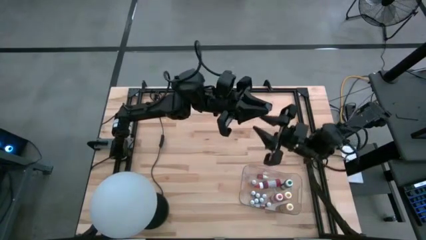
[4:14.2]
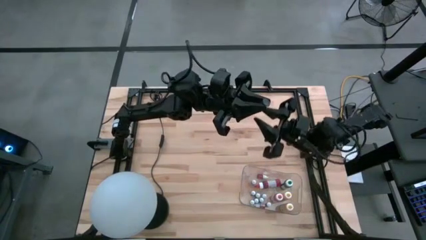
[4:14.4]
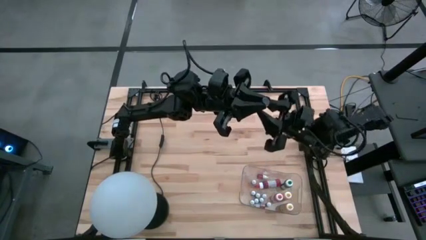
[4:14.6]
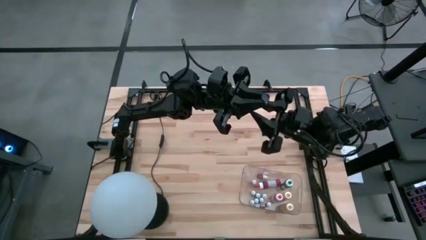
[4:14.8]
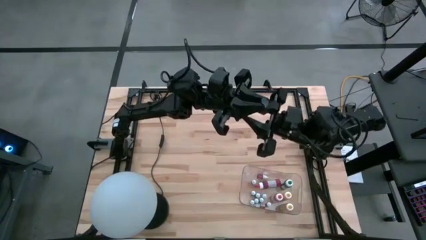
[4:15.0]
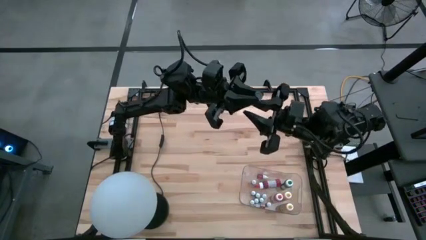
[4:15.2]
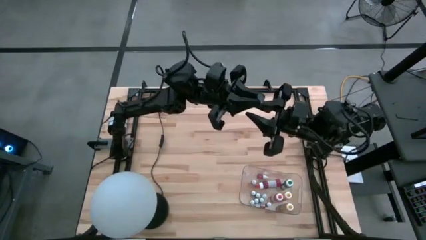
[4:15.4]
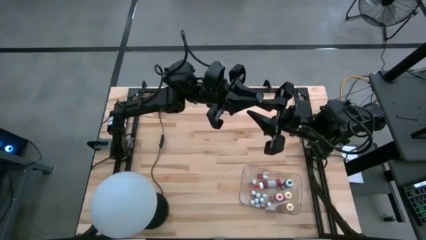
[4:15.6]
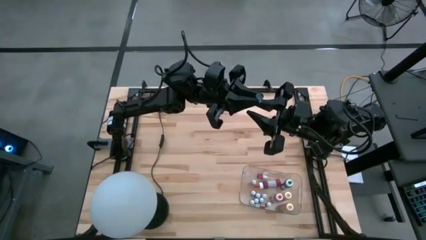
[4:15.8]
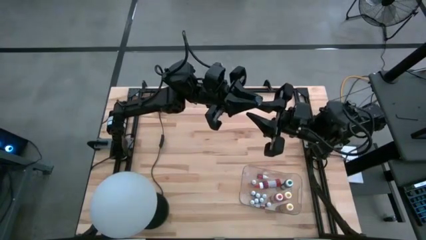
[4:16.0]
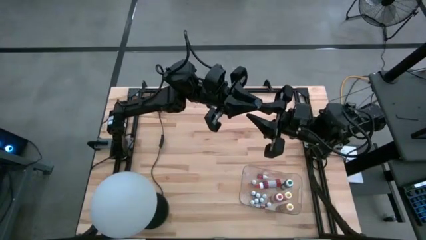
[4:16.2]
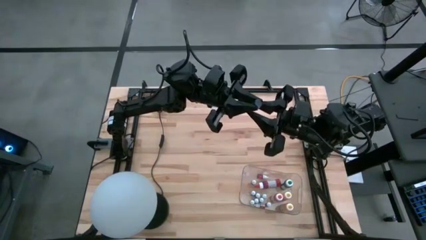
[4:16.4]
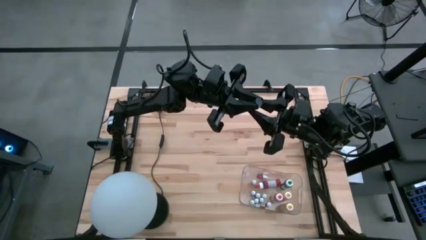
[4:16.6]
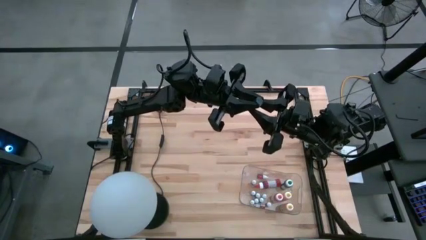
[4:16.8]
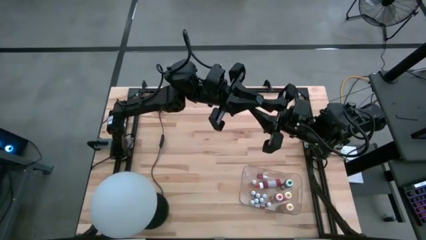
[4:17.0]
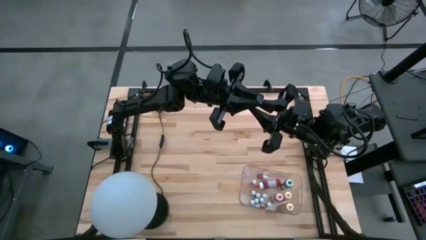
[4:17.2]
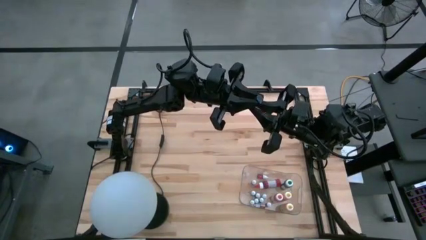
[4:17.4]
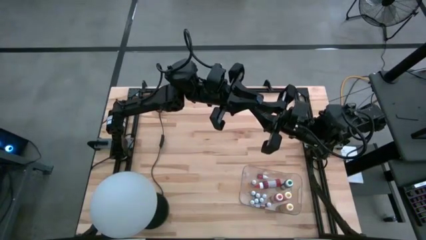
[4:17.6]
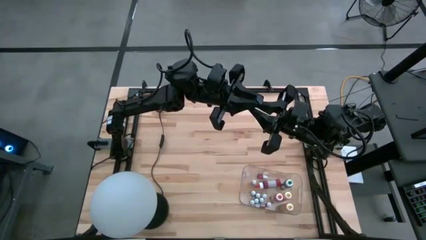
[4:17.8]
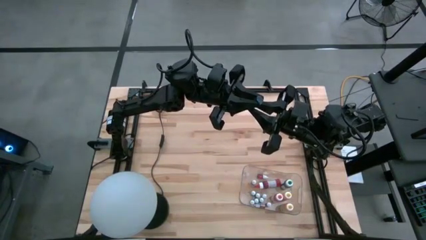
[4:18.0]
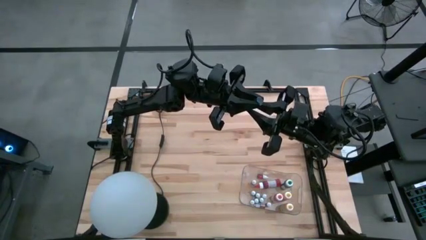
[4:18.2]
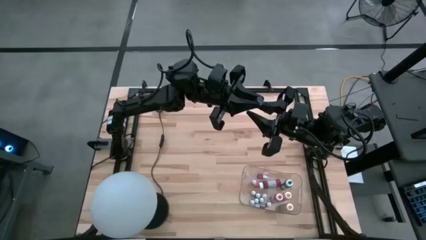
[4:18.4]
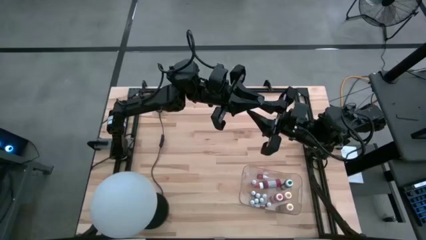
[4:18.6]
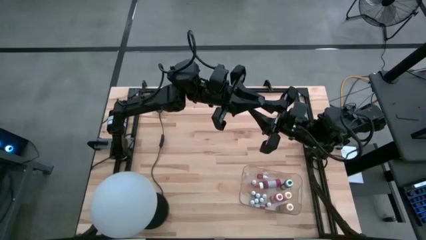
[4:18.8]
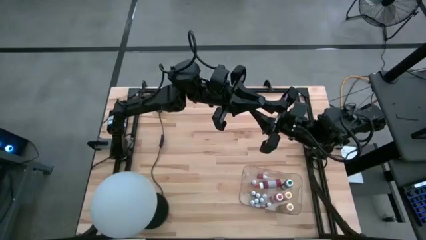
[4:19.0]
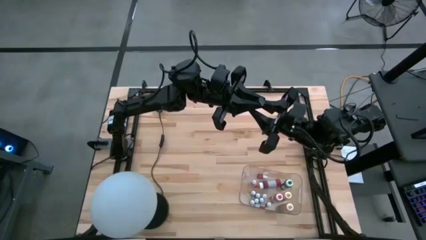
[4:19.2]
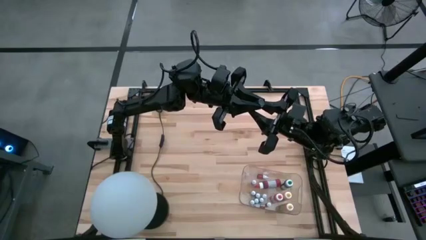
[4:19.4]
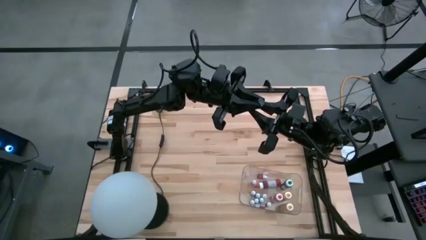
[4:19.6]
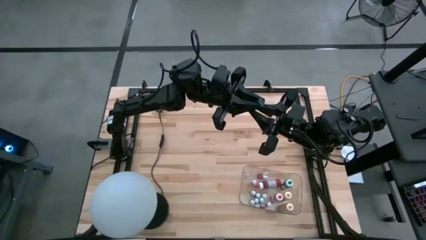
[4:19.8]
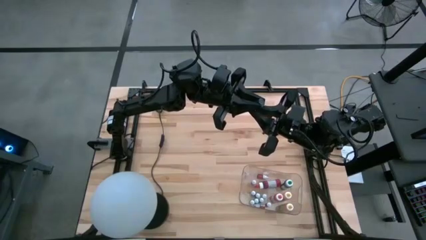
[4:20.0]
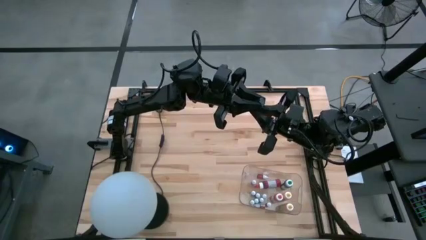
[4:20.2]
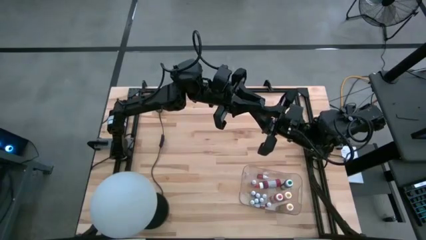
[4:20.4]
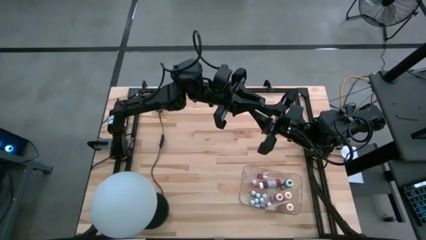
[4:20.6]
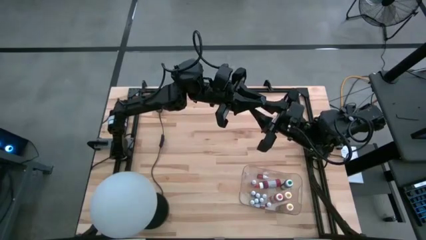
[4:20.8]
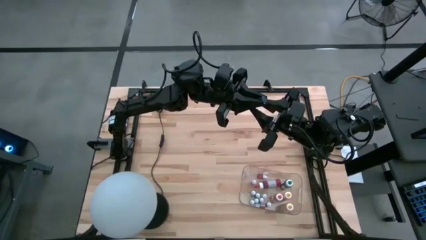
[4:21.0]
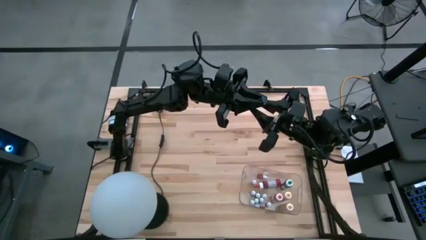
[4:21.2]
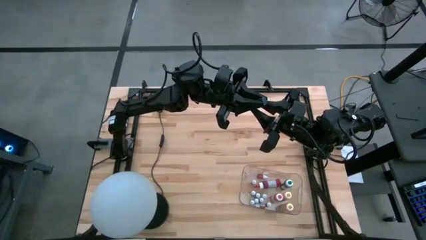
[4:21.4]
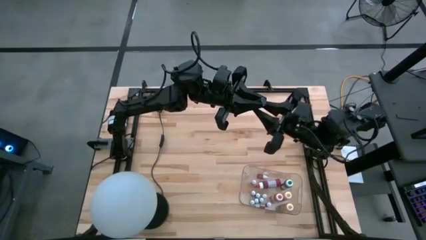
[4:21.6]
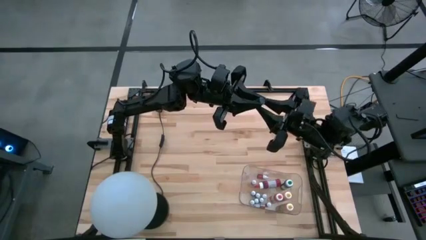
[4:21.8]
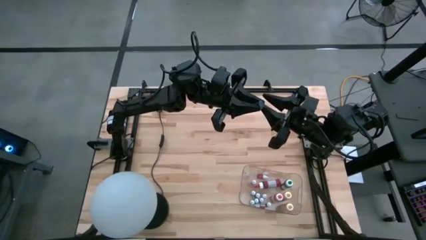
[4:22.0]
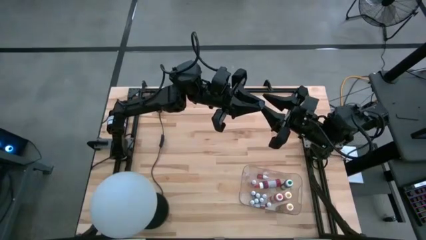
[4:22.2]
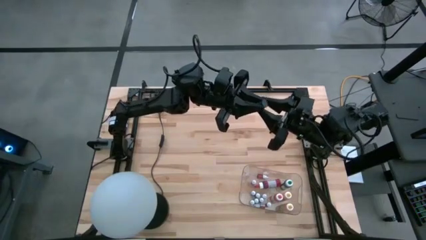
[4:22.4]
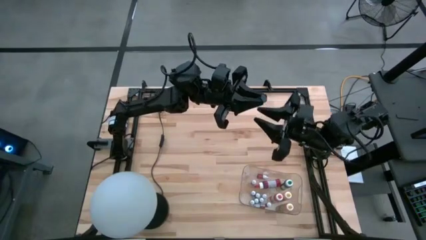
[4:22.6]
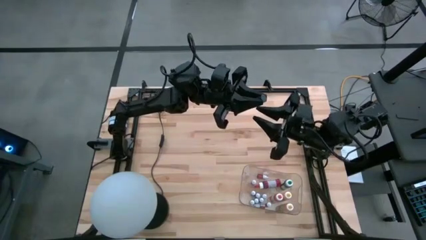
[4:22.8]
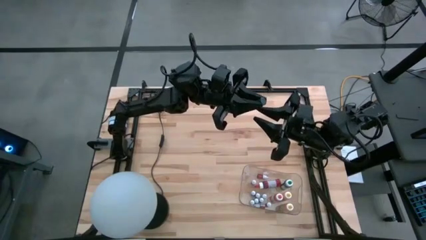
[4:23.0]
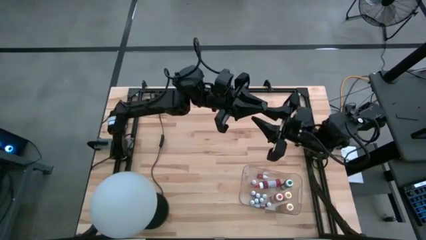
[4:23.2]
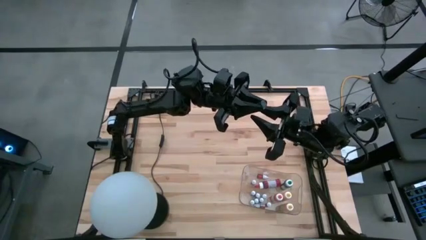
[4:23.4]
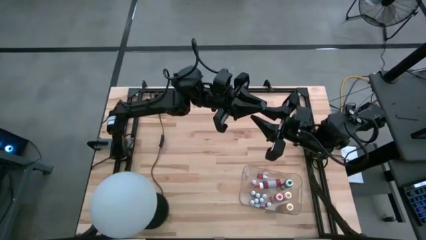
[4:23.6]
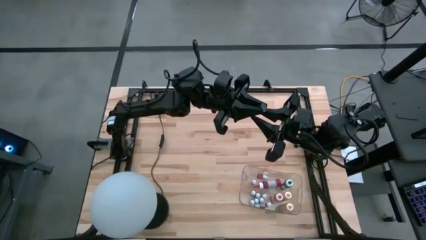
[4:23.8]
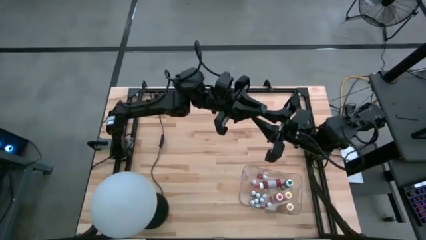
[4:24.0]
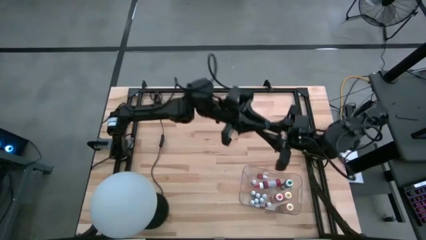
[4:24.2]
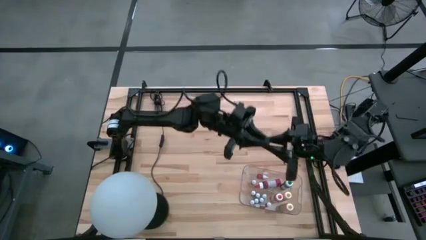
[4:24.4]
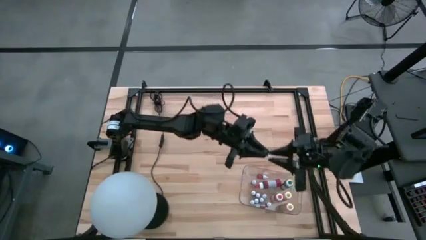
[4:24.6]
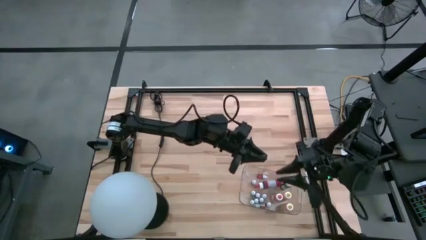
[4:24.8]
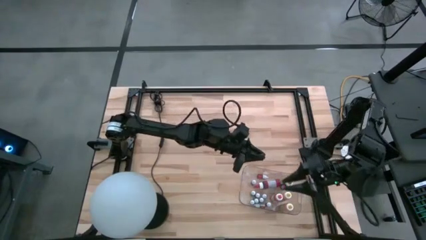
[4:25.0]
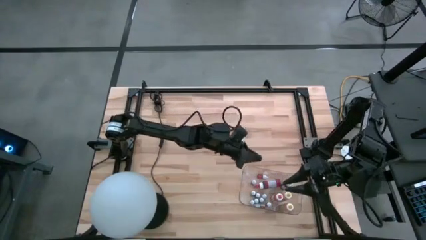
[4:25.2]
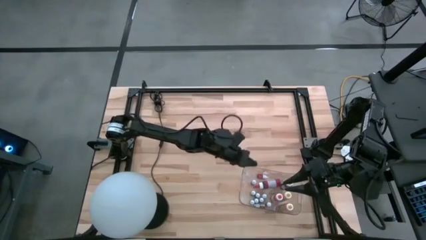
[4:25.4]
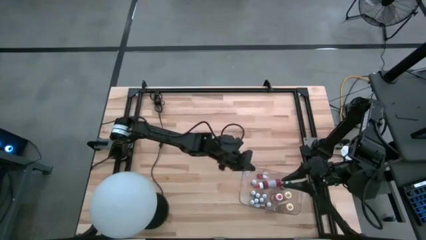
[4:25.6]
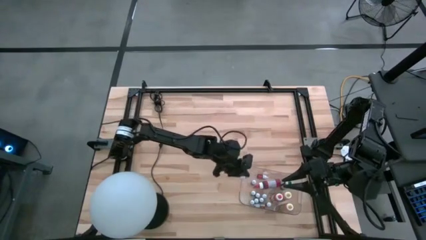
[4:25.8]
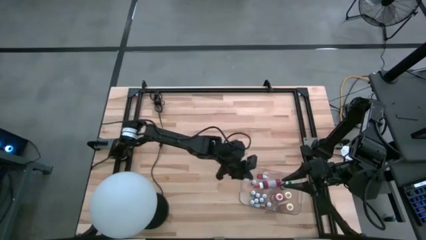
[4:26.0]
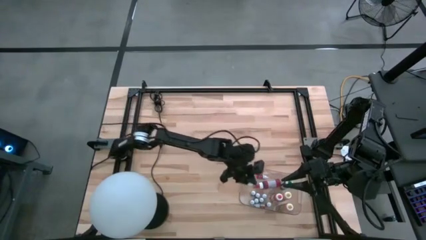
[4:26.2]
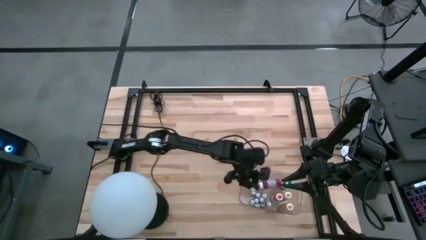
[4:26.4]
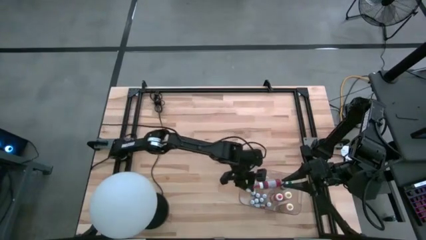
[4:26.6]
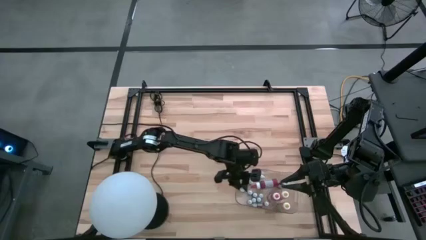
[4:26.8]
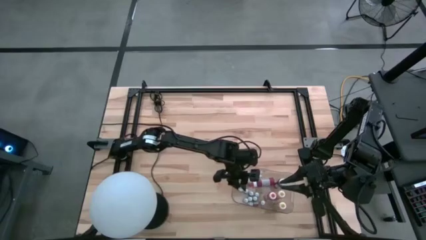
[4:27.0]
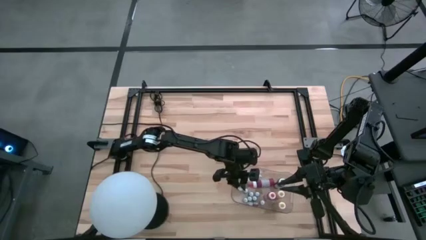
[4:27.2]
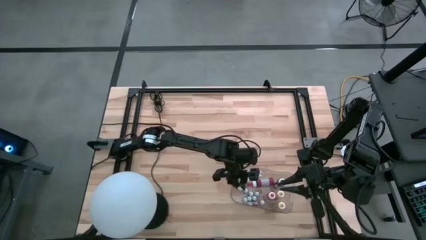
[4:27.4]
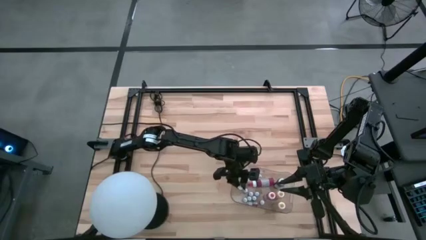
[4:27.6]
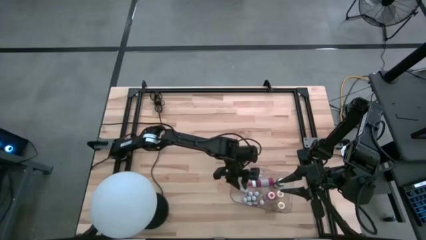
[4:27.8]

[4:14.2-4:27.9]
Task: Pick & Place food coloring
Put the black food color into the transparent bin

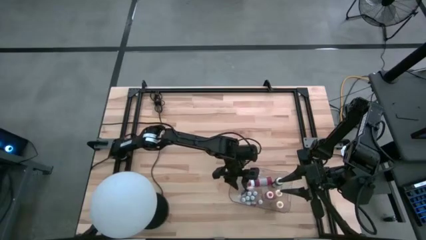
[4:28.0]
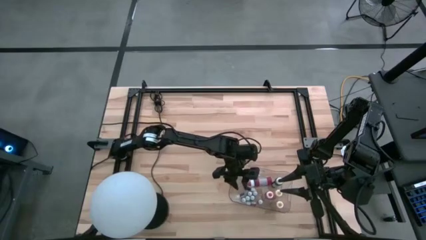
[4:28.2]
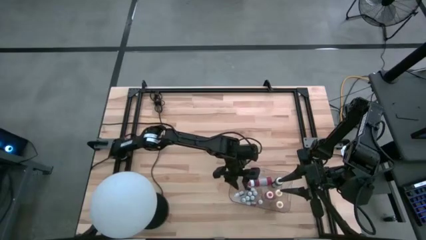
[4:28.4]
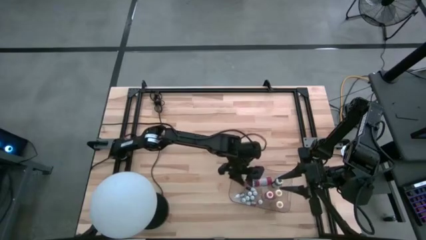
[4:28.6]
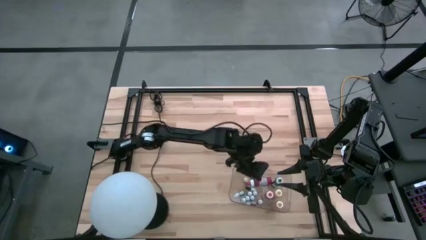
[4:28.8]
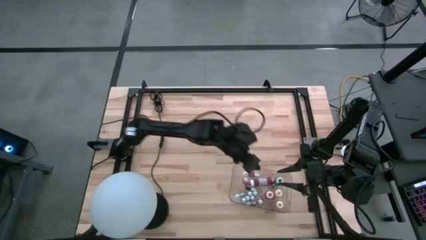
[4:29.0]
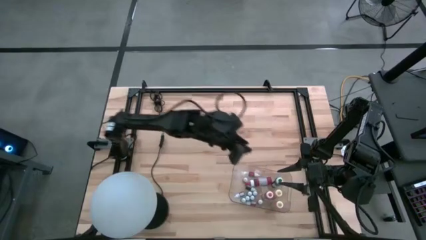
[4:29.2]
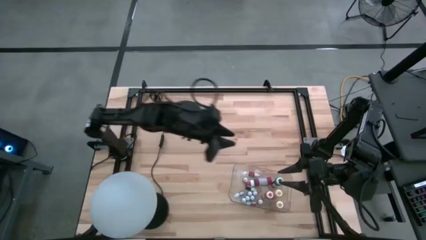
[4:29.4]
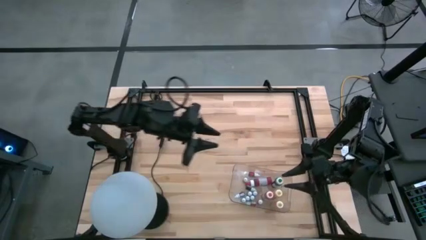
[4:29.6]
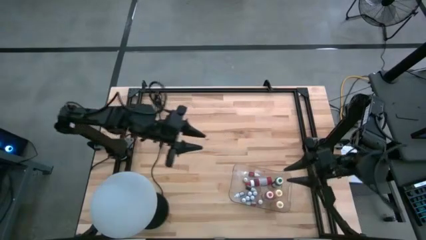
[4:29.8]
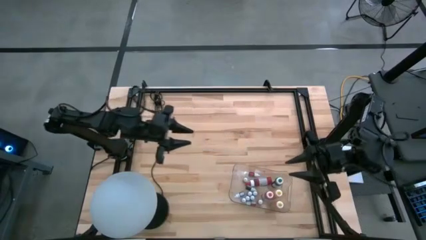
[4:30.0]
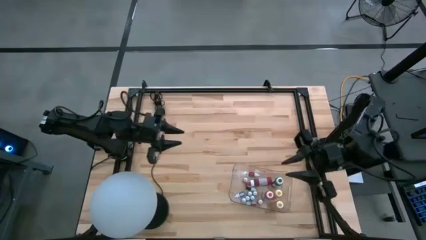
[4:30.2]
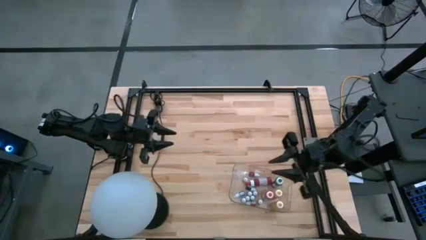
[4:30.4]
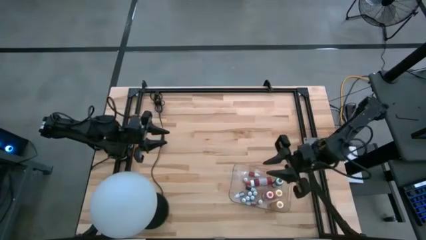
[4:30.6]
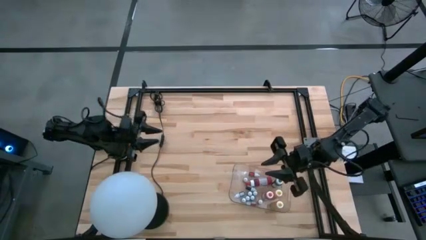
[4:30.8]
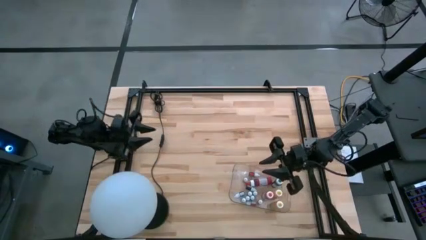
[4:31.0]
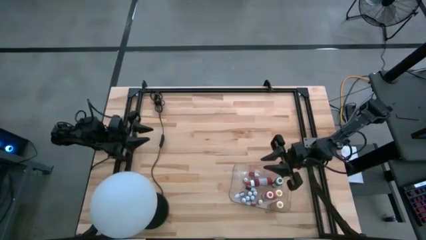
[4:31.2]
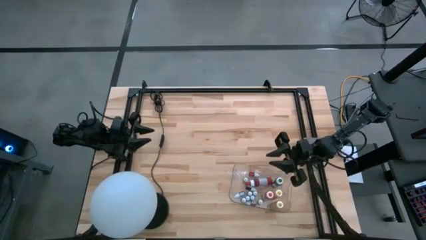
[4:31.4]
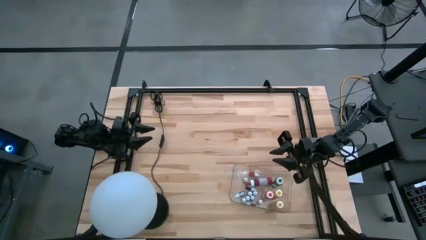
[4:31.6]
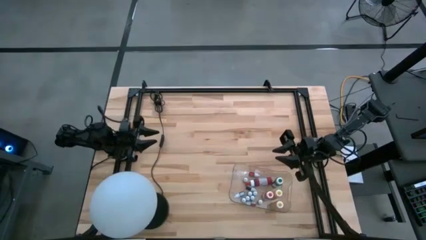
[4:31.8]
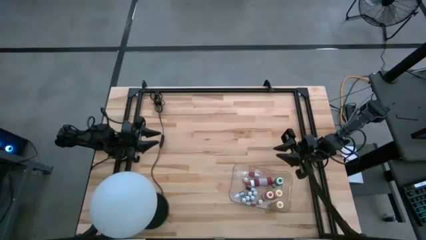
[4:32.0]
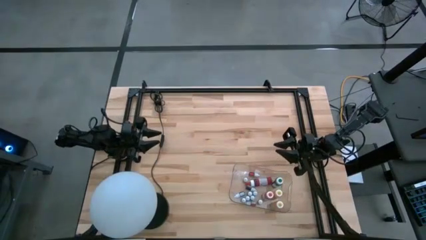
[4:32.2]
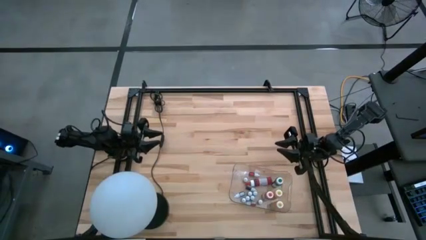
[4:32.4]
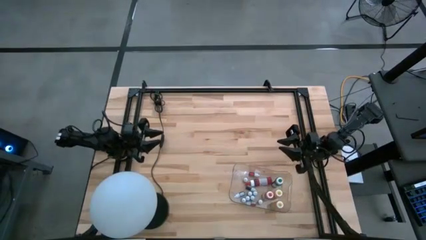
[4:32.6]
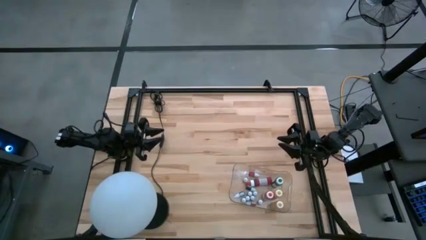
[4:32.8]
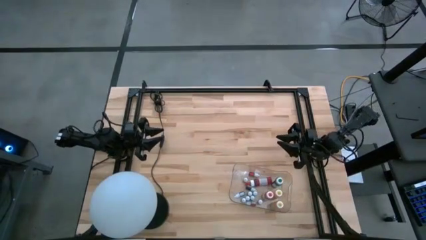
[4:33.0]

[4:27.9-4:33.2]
Return to Home Position
